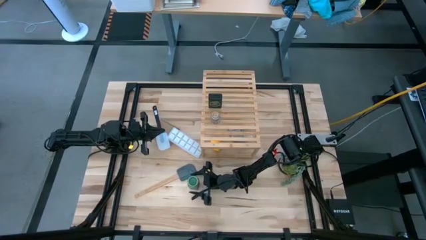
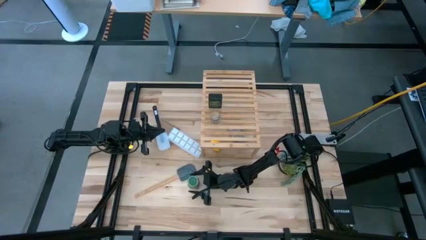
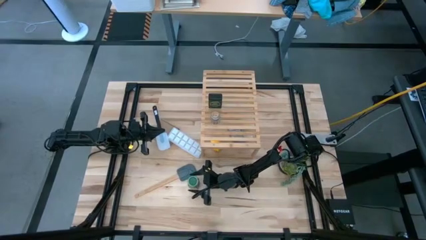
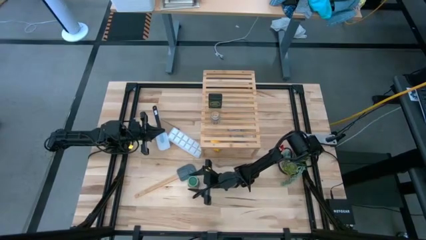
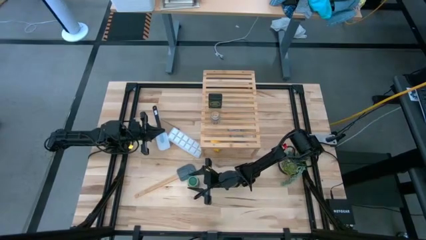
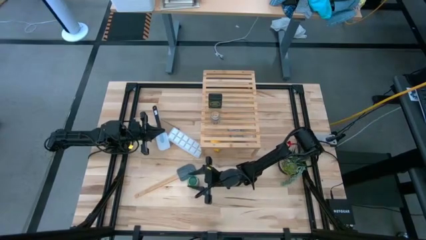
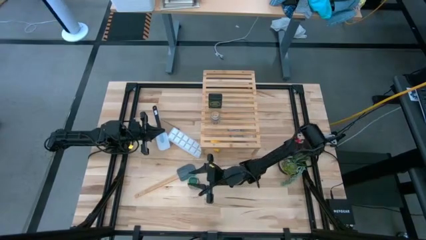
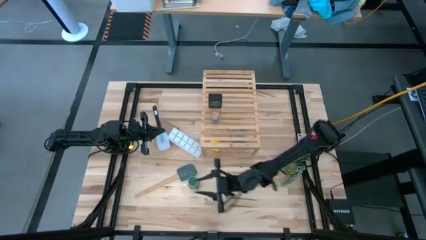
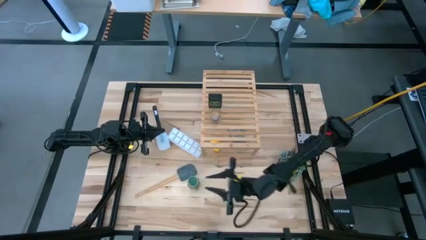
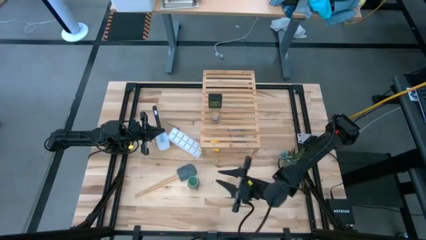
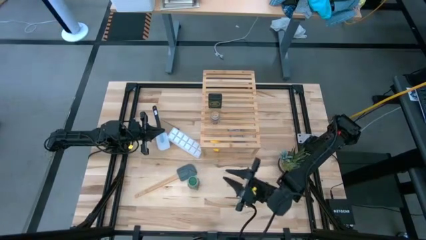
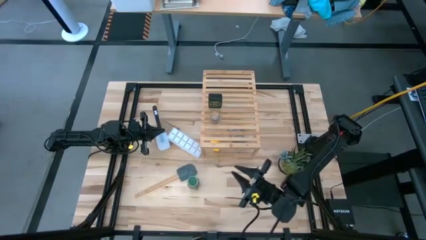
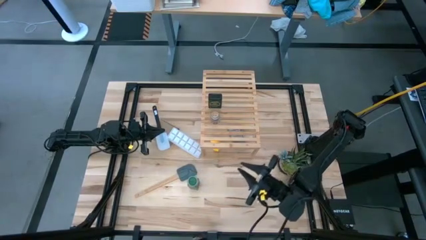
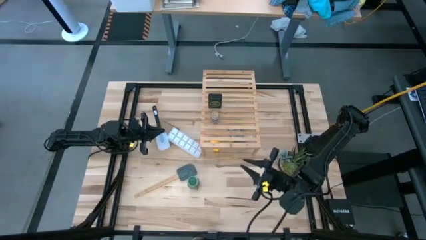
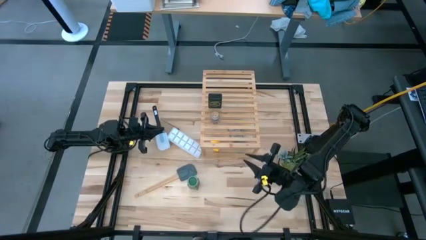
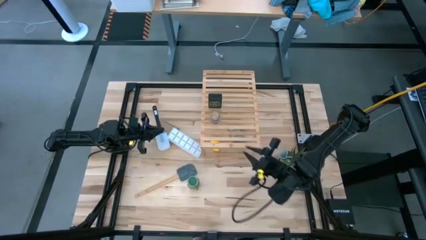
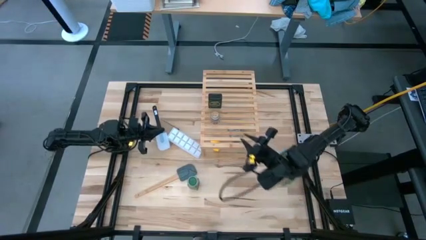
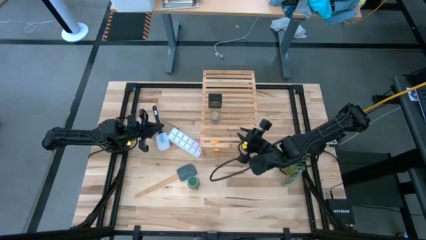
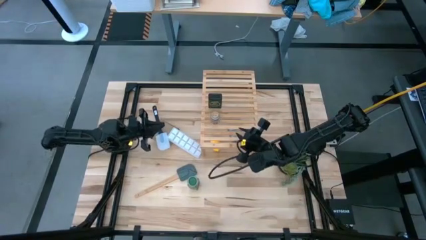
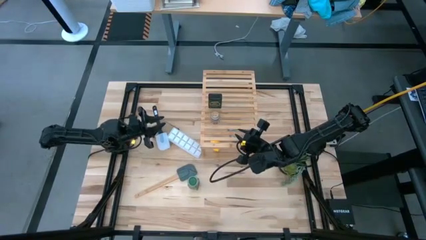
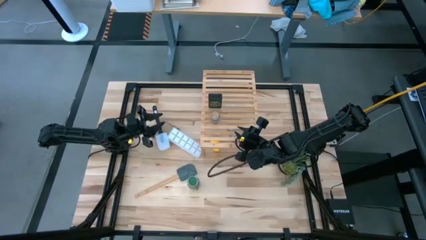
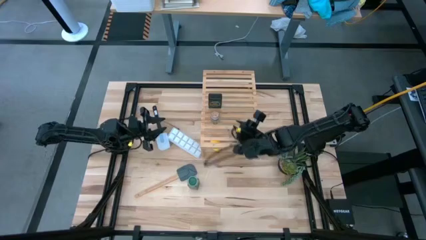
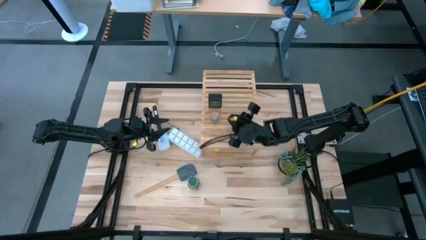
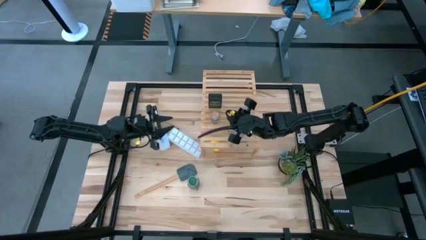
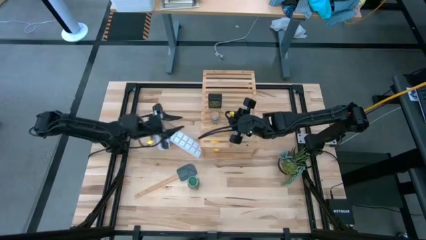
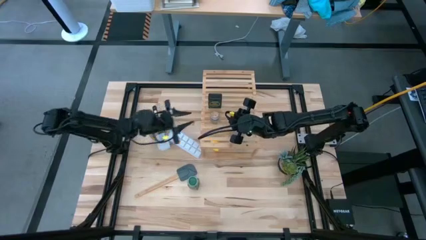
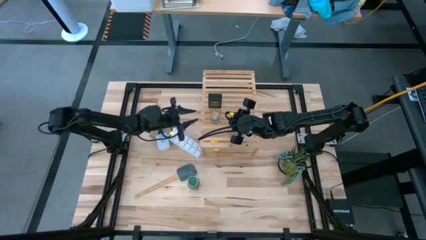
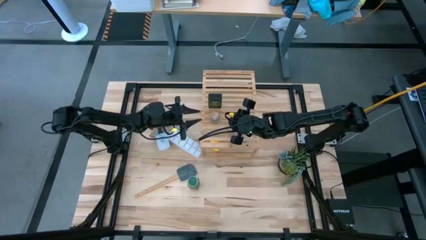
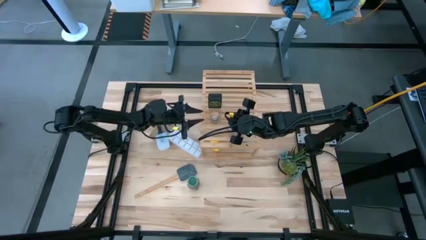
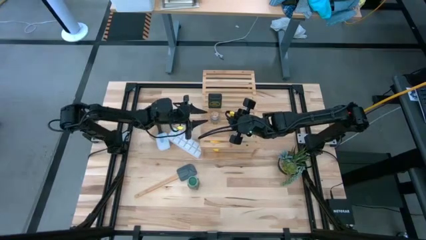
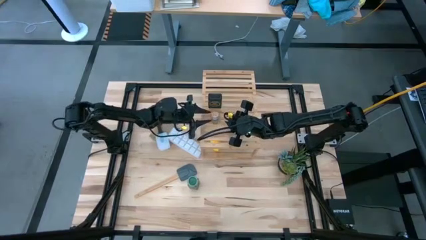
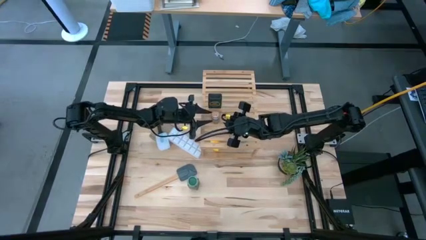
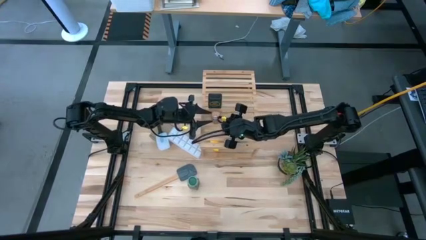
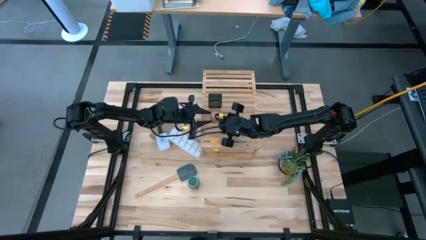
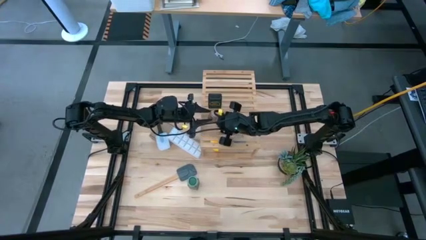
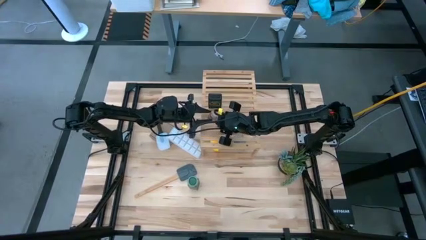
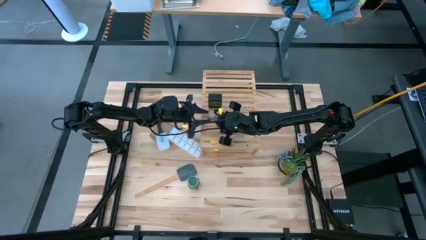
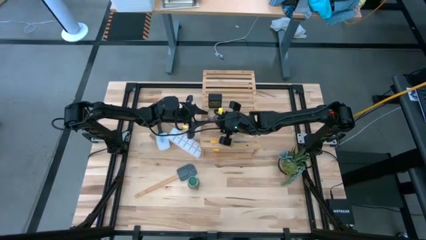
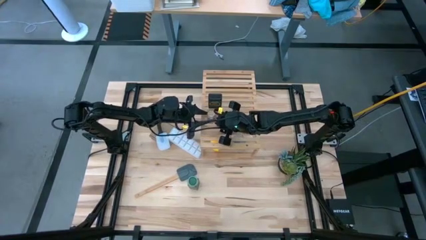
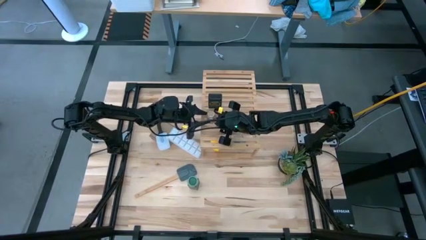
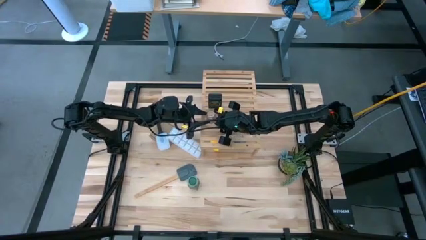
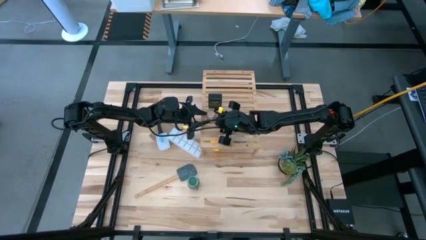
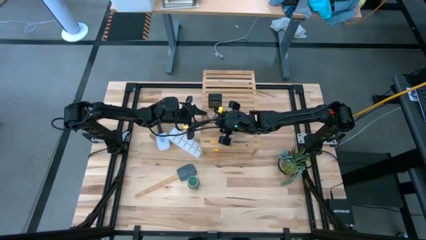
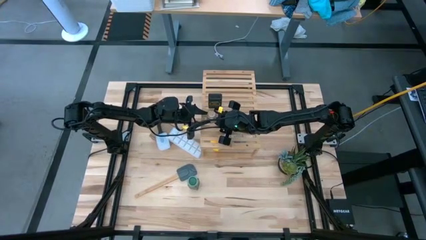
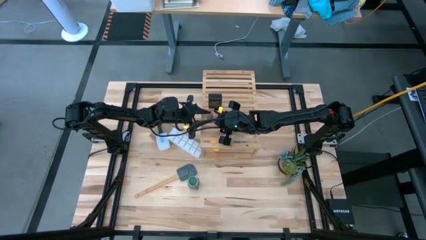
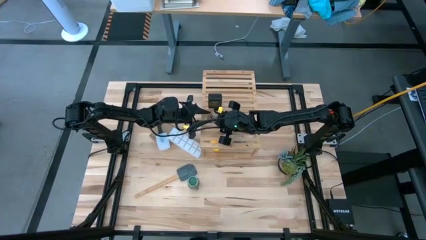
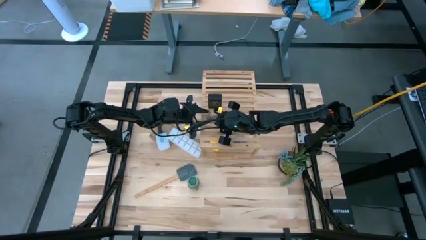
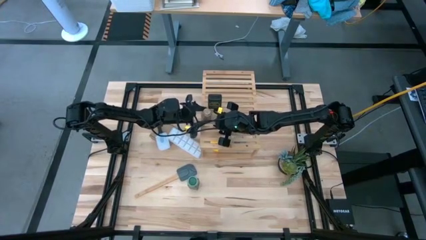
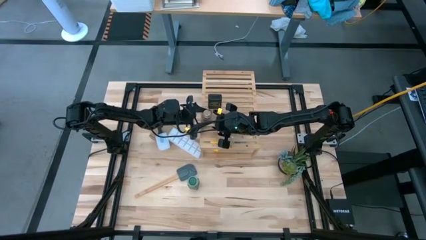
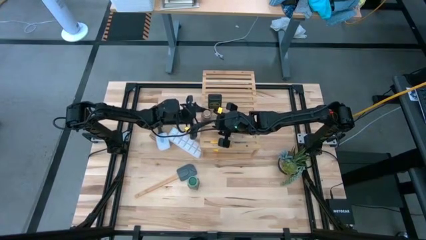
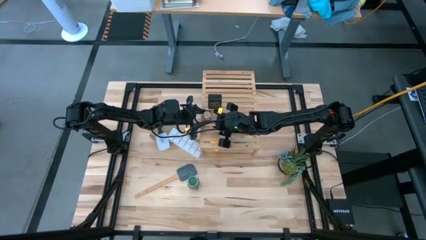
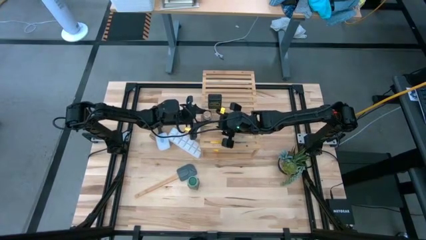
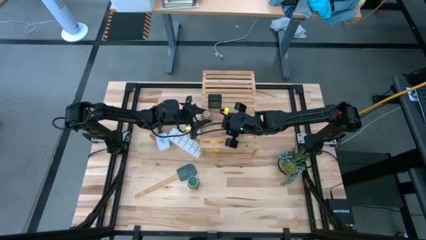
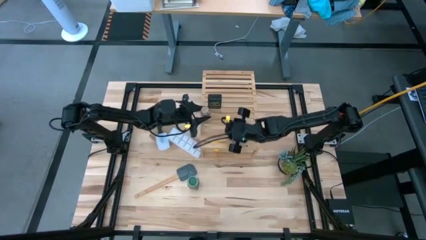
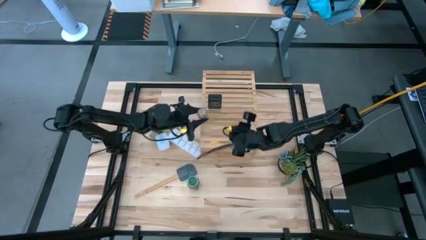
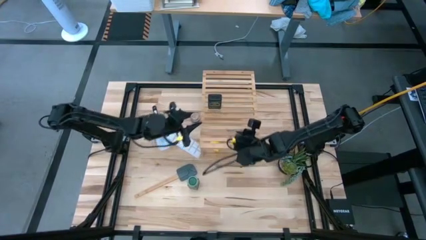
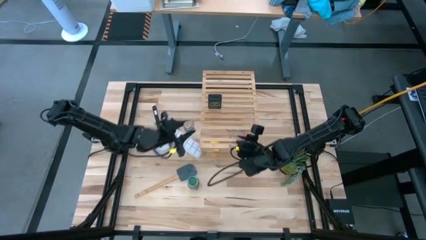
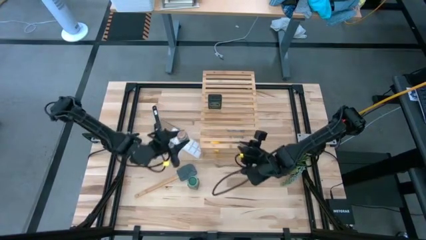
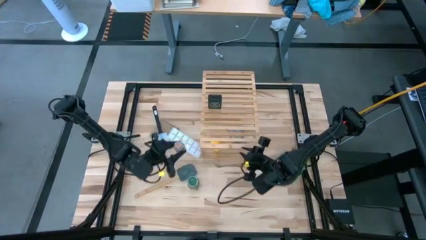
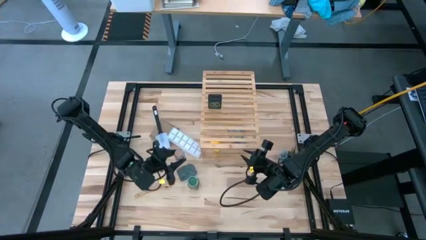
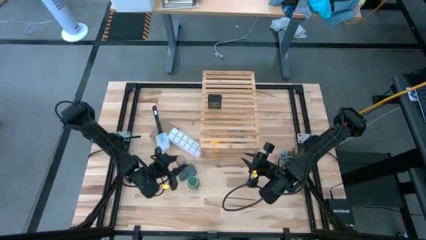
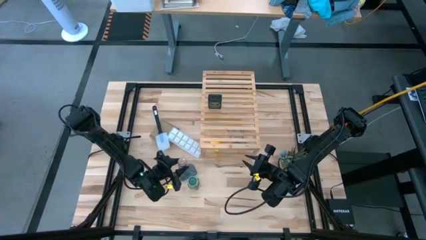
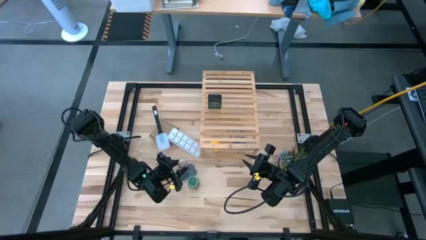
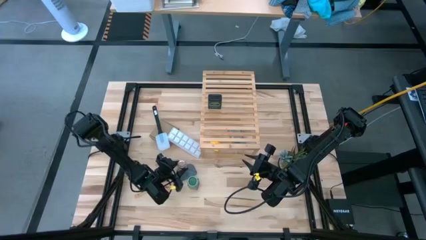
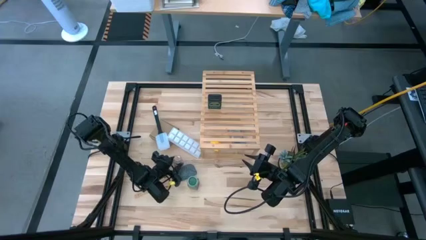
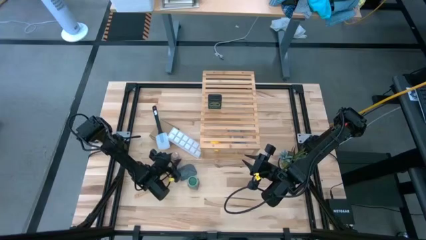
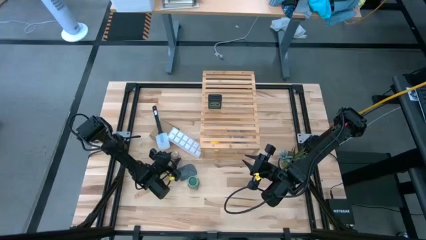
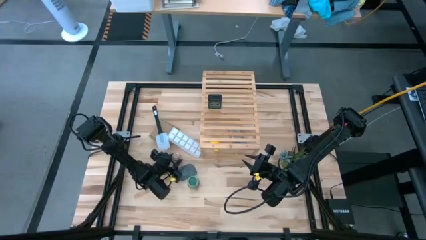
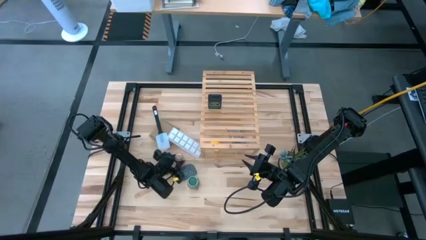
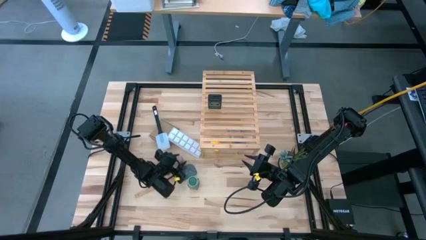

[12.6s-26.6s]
Task: Shelf spices
Remove the brown seasoning bottle from the shelf
